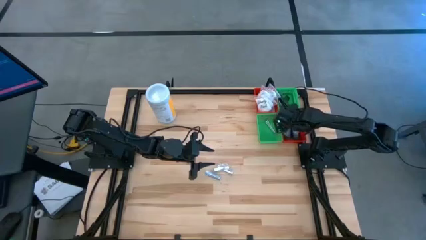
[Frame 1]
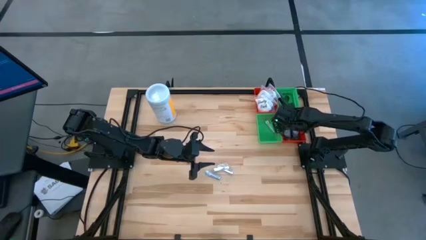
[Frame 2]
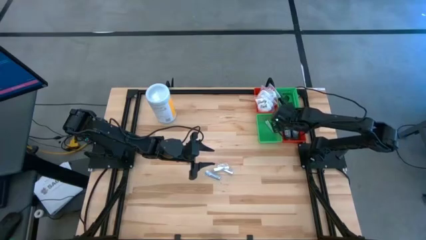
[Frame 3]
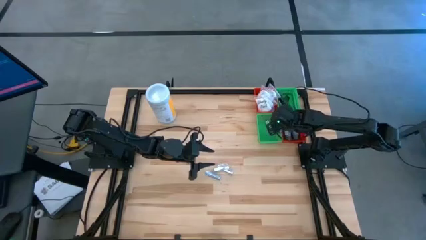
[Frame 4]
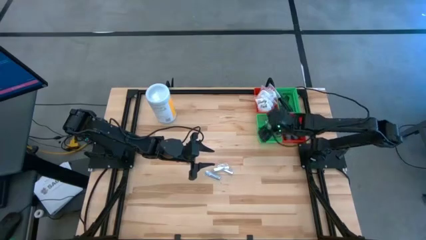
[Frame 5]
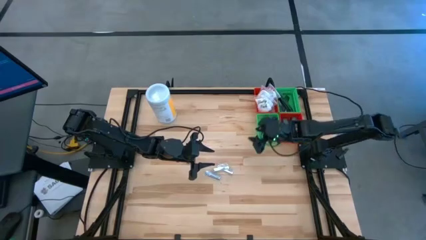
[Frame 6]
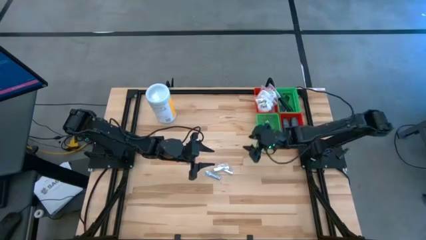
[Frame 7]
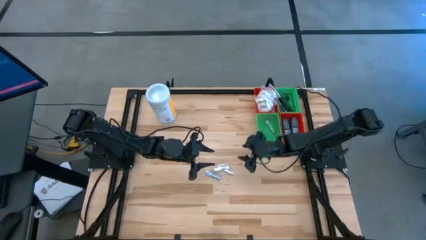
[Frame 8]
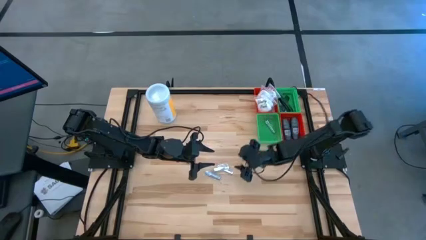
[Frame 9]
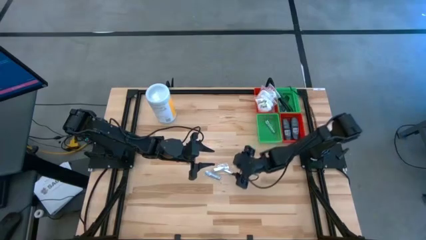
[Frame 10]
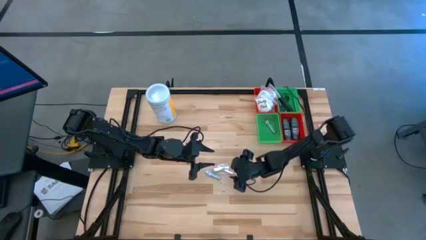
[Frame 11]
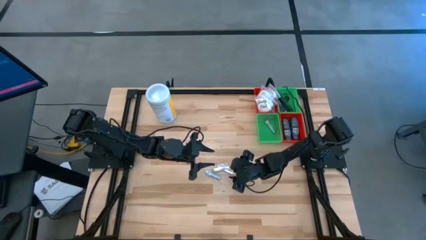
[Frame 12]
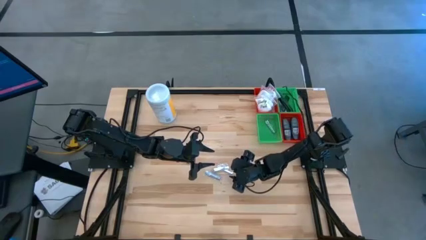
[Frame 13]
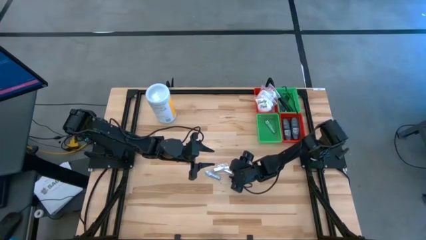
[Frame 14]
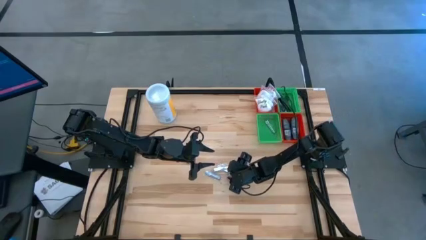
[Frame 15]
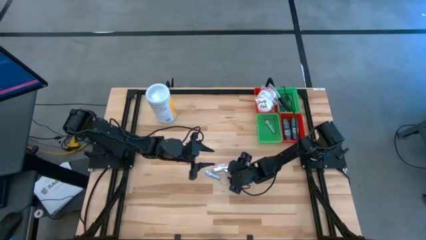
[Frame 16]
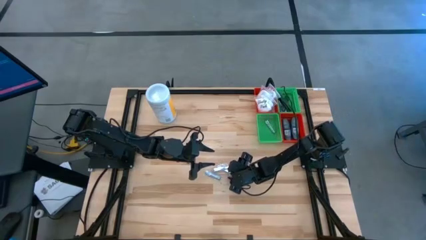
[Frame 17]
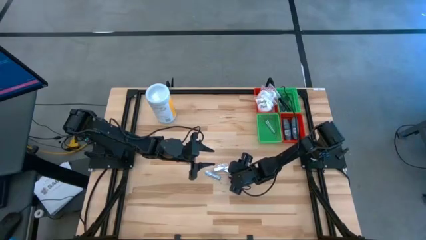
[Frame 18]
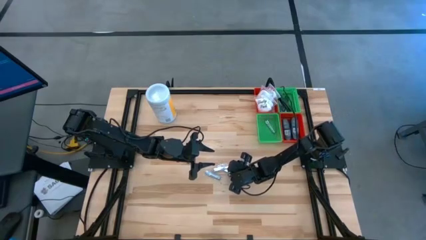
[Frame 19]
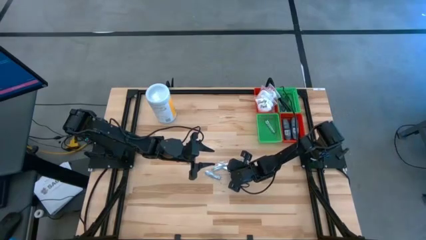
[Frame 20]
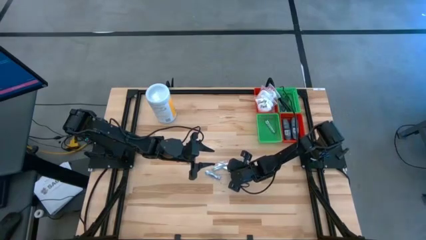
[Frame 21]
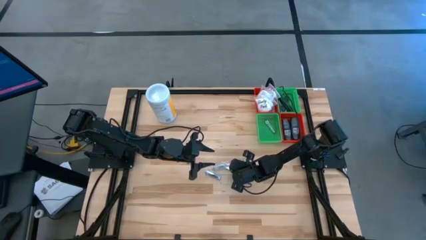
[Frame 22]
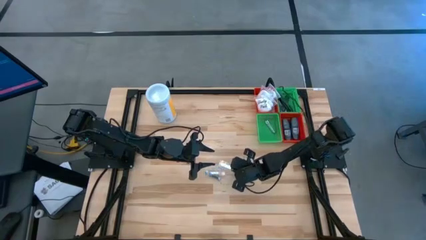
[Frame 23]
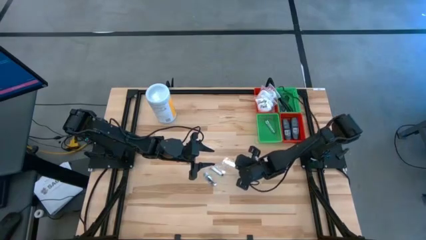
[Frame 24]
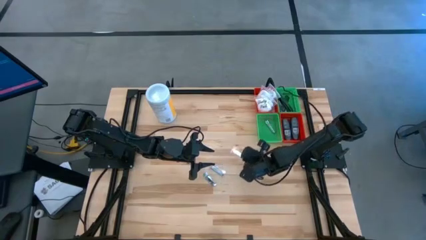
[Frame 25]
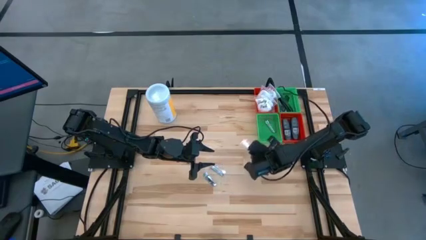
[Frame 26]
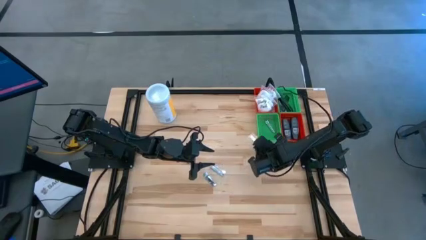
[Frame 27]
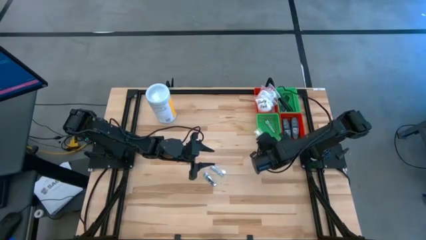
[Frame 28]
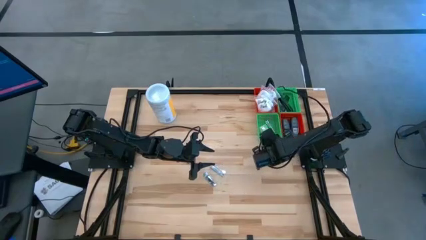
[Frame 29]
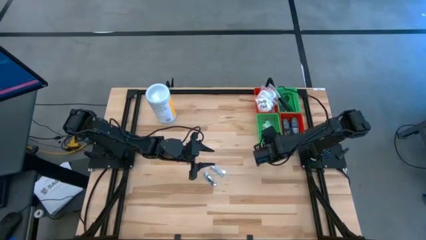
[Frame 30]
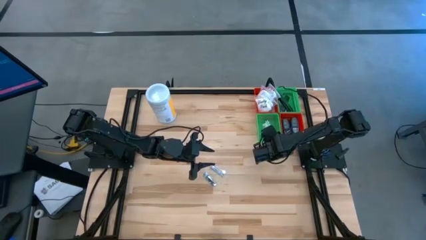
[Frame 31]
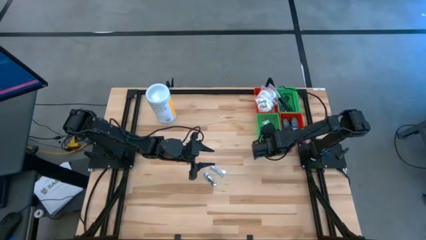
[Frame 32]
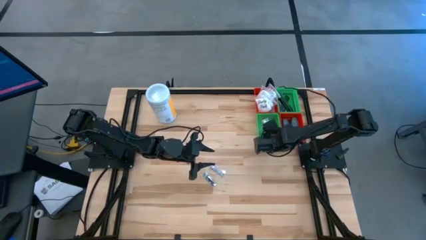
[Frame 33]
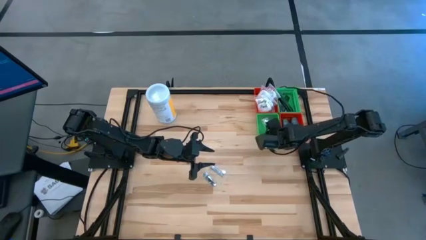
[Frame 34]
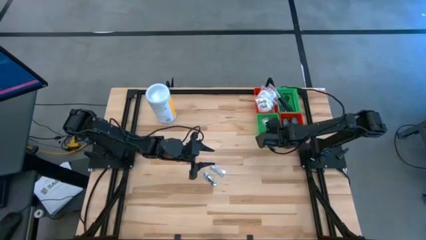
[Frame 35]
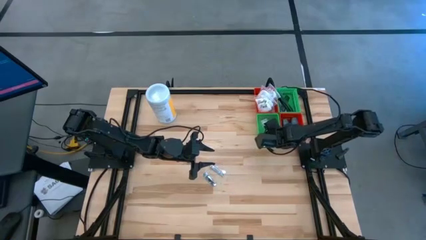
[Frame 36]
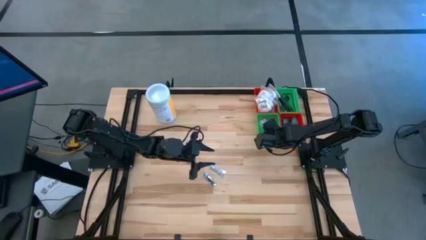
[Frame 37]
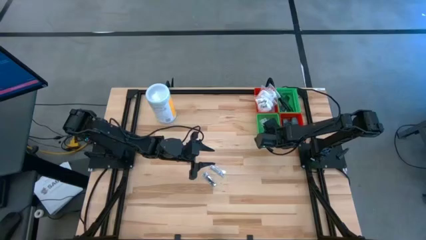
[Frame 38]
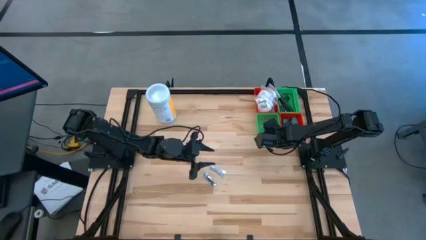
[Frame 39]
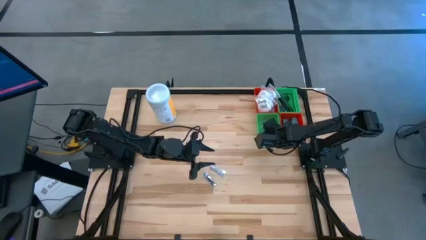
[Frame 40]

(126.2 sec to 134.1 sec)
Task: Pick & Place Travel size toiletries
Put the silver nail cutter into the bottom green bin

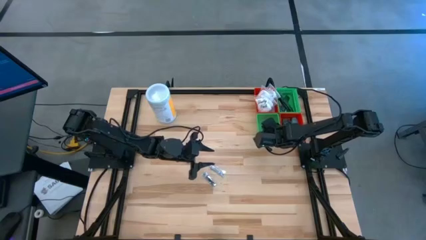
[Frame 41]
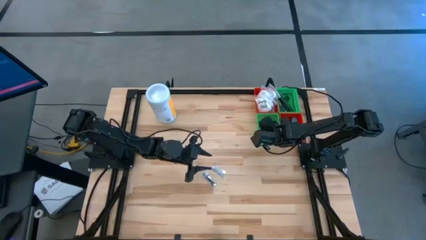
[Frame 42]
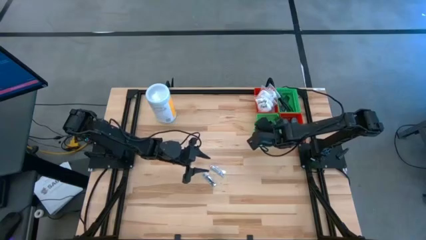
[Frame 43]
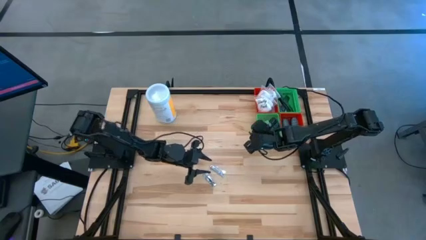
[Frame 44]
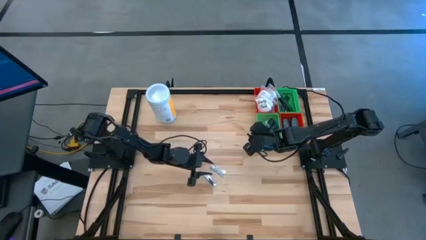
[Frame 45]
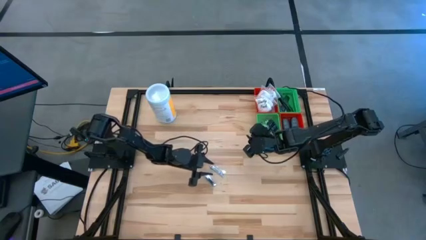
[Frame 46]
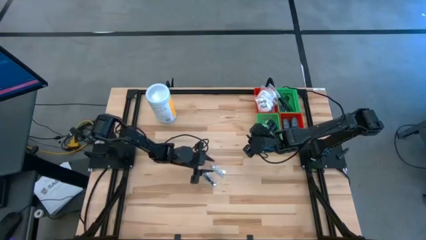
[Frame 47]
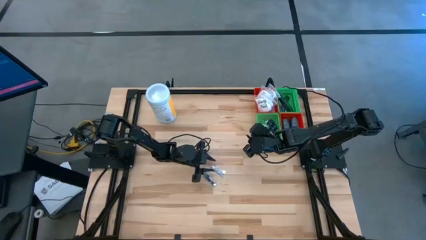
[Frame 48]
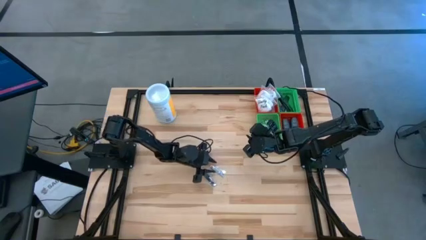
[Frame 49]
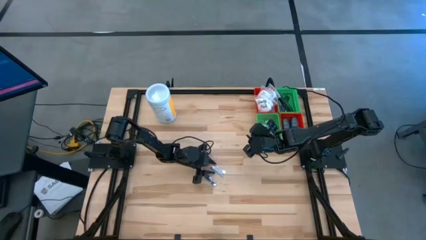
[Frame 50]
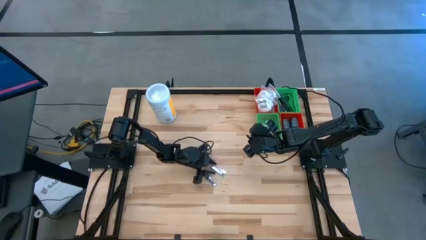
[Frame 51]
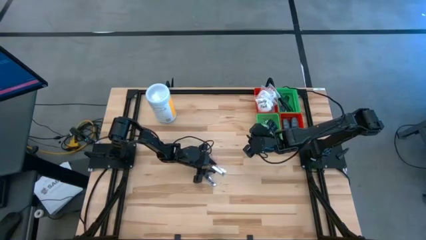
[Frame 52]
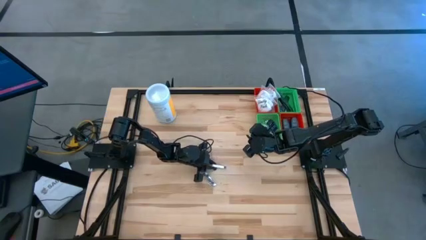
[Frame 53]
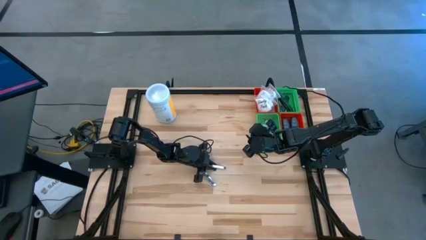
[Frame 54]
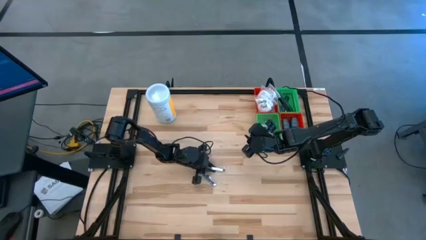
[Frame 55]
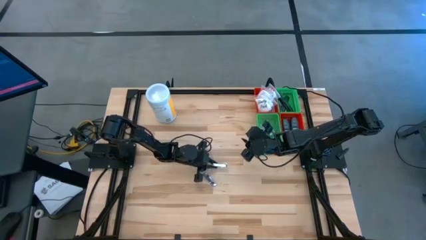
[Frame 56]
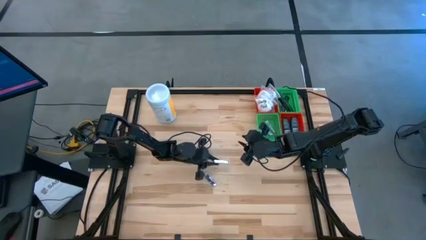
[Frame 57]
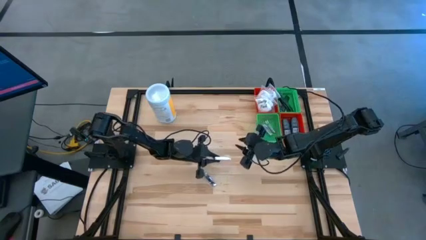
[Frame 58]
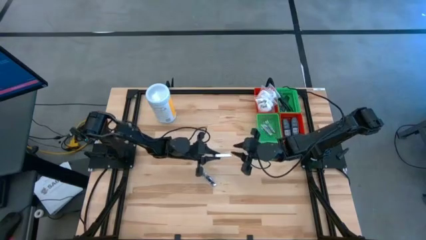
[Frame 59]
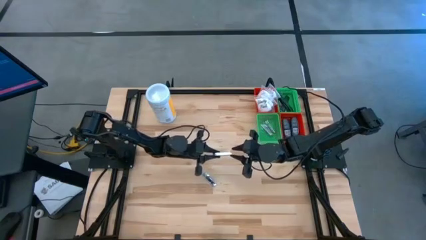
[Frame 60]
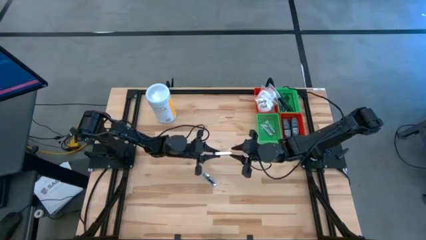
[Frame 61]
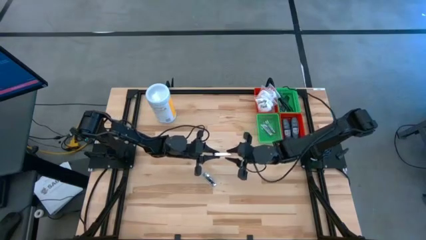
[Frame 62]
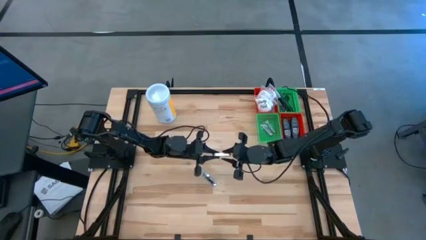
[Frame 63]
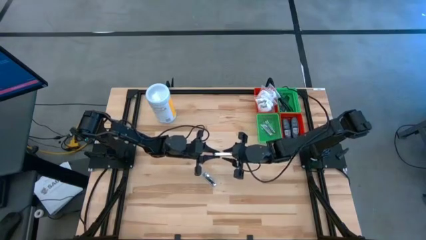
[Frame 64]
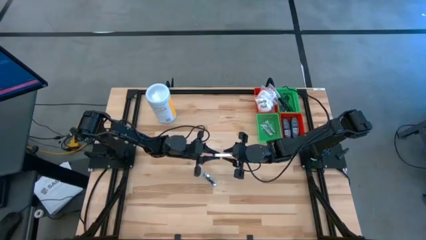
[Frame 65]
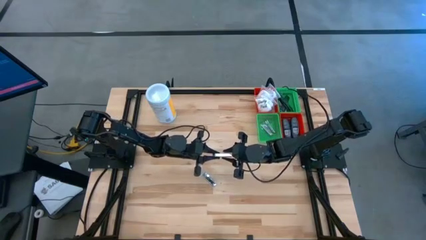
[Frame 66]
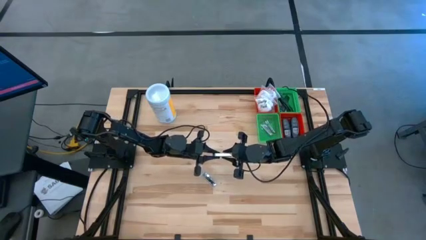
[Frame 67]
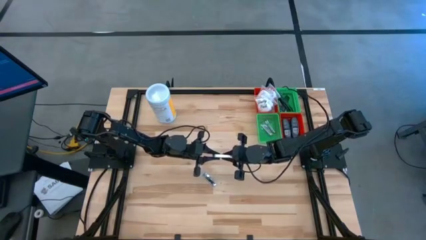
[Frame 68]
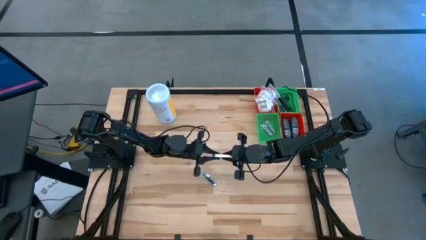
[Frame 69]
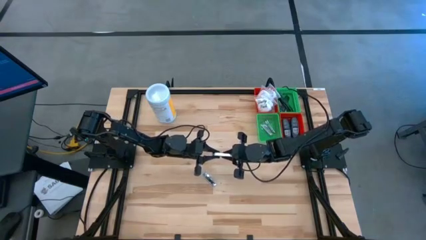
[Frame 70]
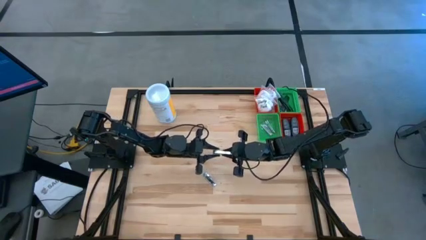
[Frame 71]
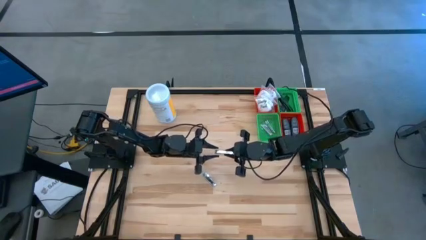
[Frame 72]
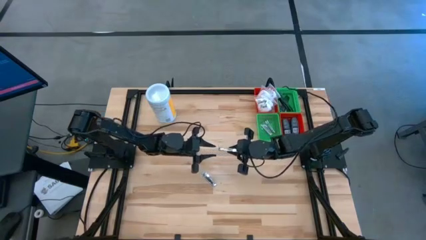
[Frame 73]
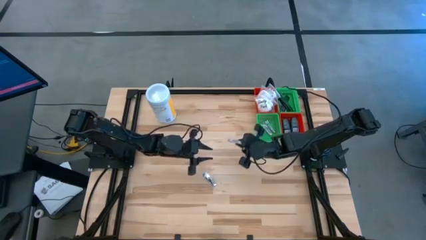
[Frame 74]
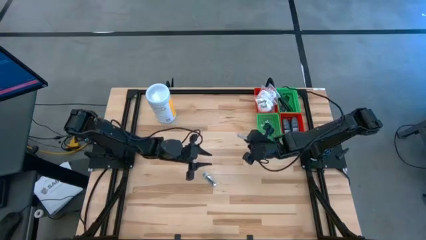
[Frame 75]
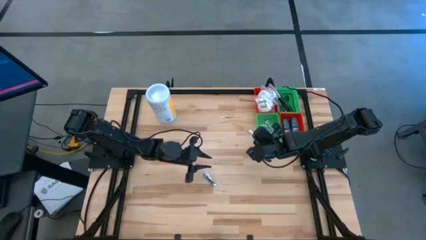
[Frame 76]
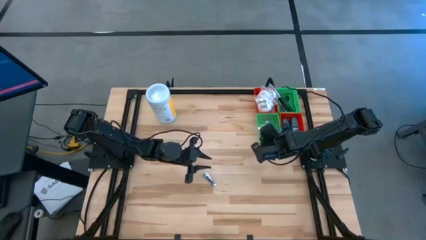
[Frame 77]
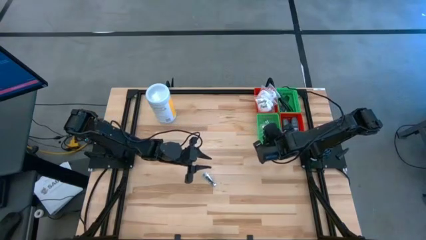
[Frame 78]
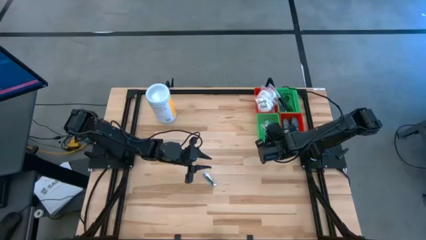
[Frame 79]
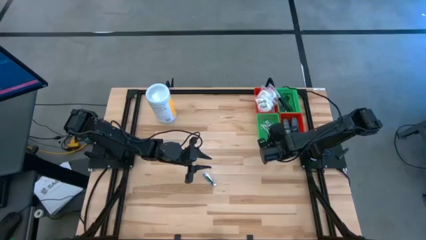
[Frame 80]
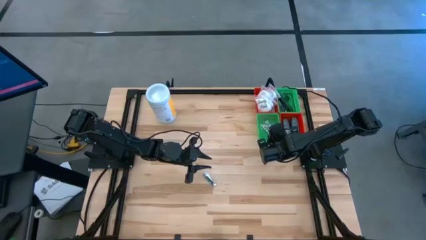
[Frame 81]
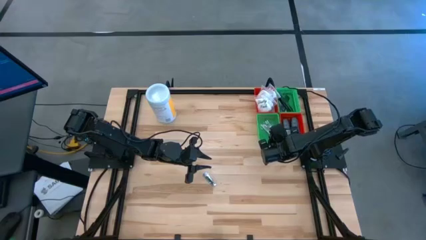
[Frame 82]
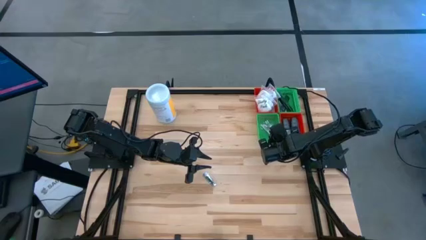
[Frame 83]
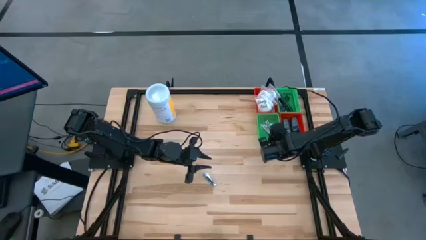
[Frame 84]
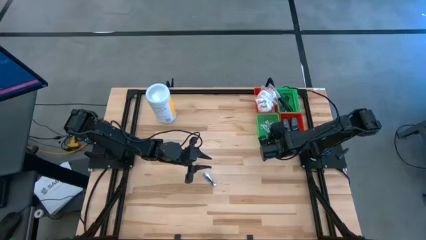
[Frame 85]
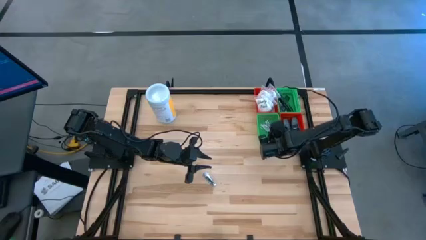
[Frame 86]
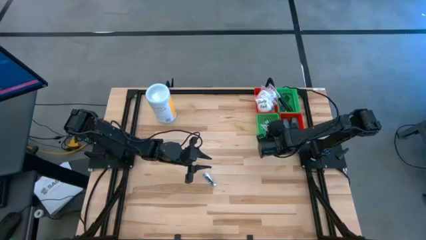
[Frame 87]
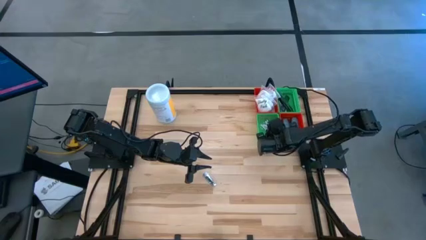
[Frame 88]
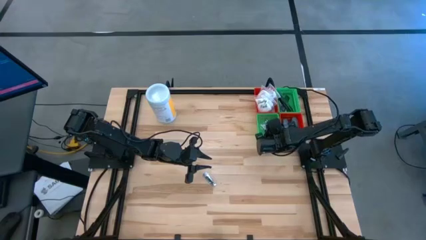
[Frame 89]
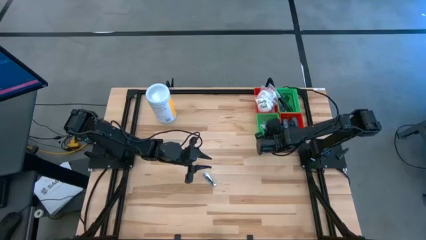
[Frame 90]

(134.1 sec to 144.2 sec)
Put the silver nail cutter into the bottom green bin
